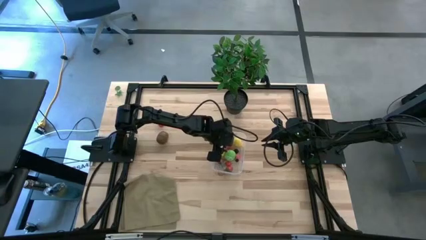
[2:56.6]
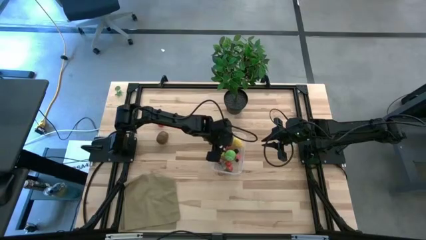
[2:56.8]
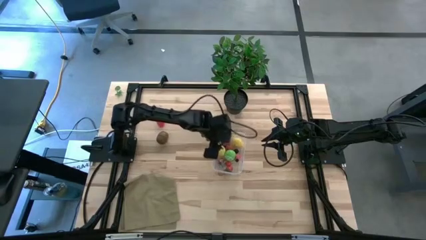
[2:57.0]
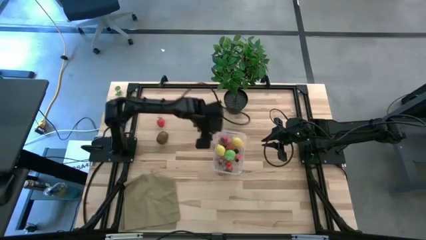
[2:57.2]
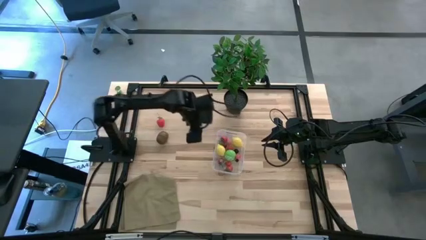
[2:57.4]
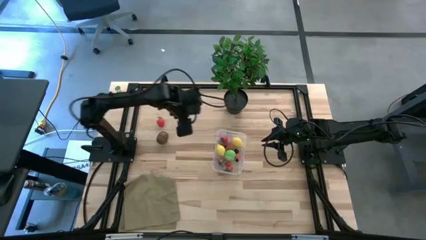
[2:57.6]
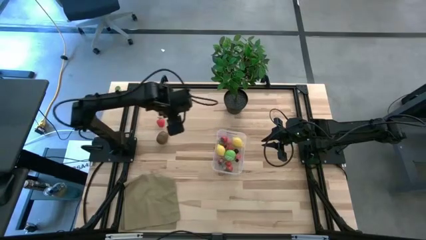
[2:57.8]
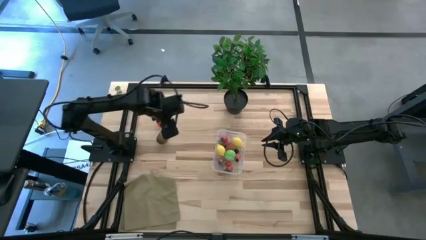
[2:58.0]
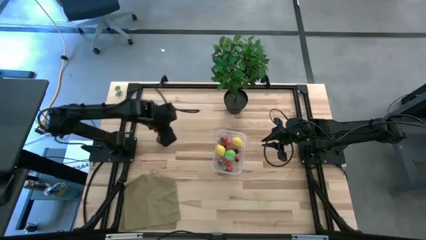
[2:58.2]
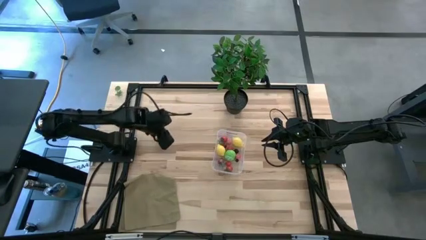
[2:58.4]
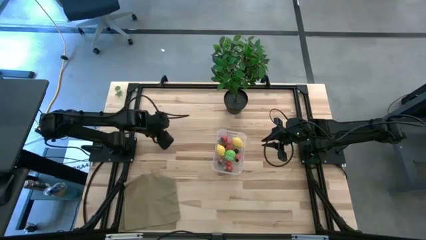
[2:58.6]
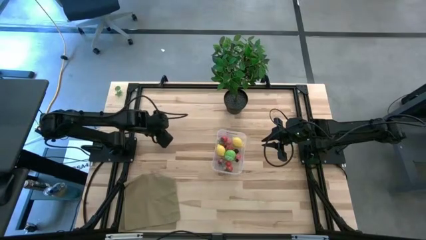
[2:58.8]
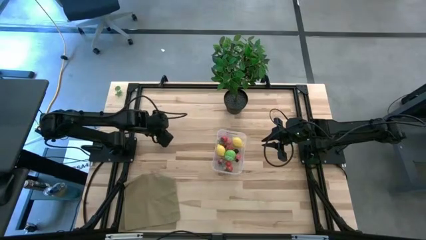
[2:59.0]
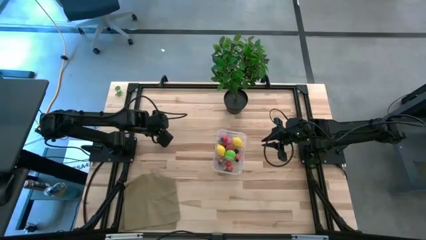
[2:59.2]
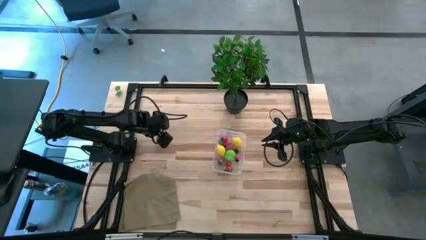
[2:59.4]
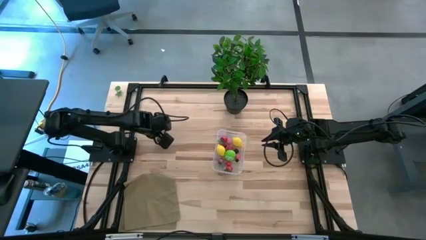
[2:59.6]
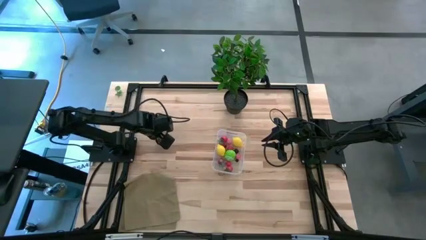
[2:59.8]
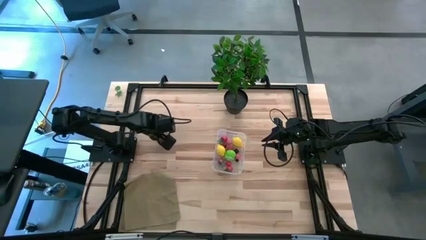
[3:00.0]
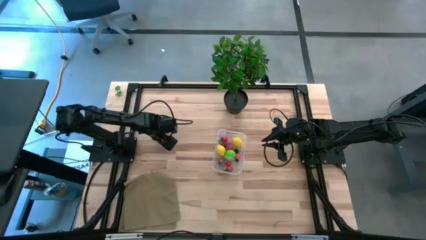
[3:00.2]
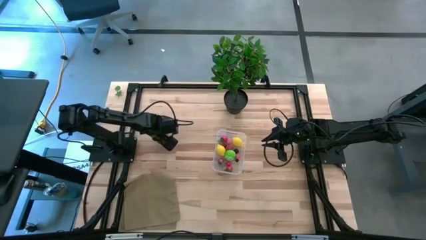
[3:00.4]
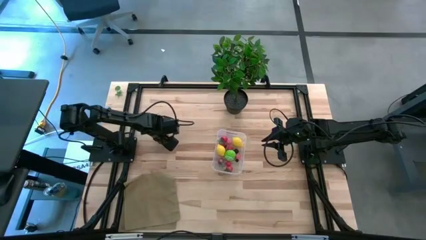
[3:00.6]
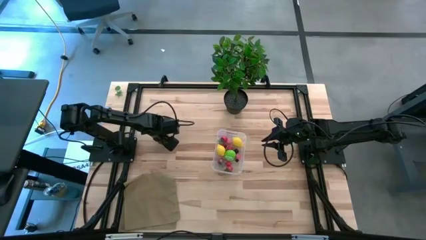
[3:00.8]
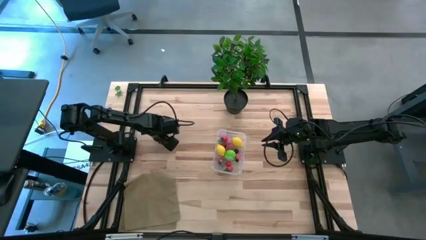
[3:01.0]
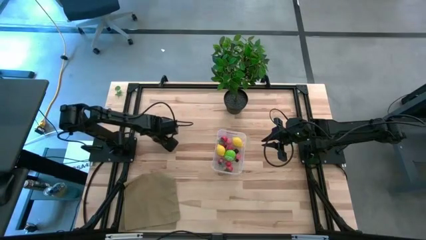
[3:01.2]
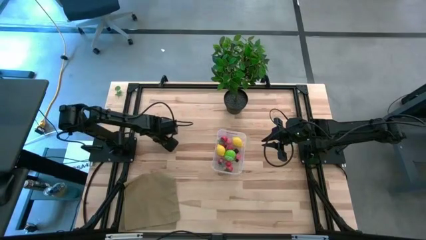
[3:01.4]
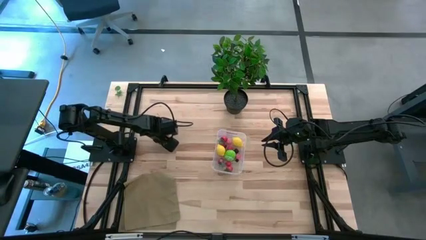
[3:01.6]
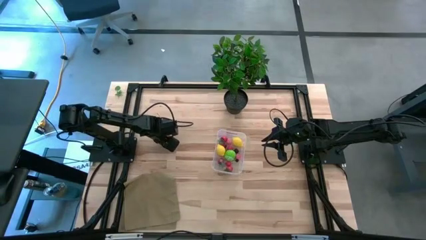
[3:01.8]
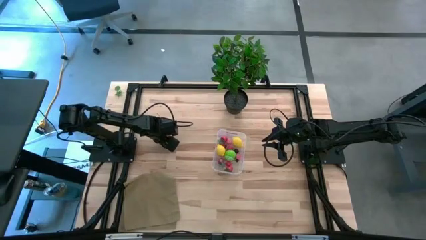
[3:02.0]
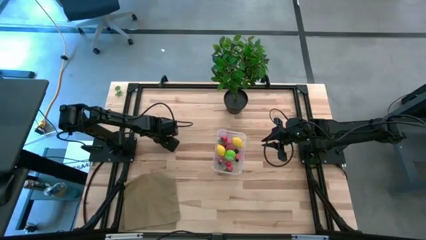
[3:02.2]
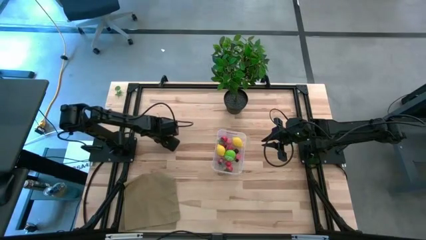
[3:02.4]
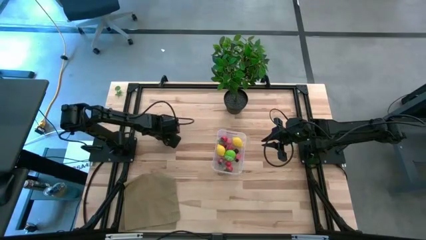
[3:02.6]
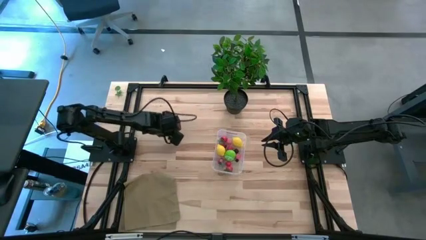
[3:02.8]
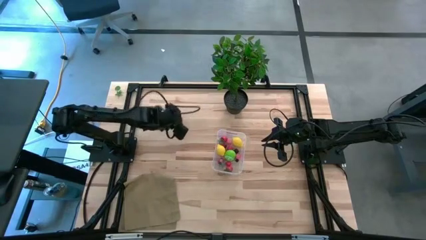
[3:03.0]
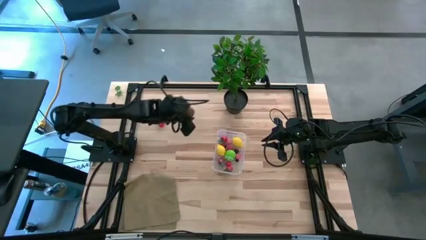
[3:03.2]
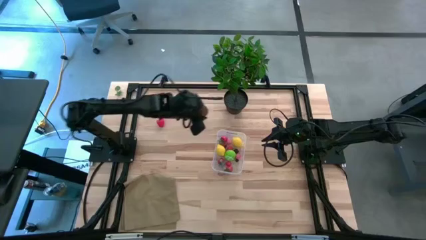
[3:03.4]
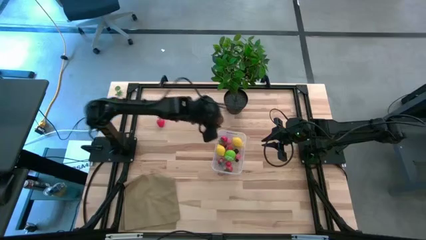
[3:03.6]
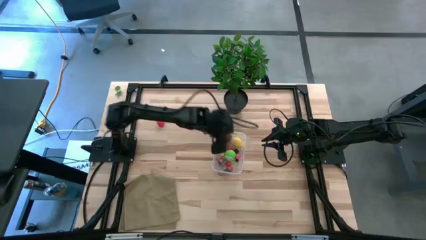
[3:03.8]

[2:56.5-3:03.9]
Task: Pick and placing Produce into tupperware
Put the brown kiwi into the transparent container

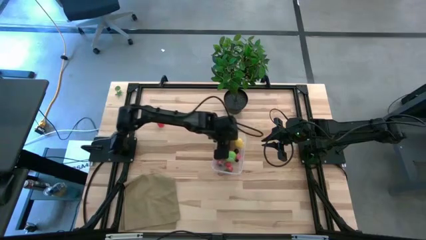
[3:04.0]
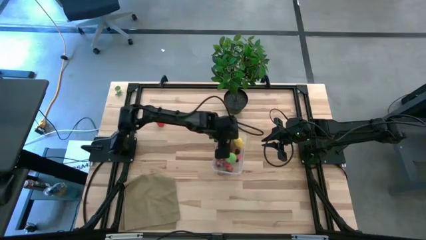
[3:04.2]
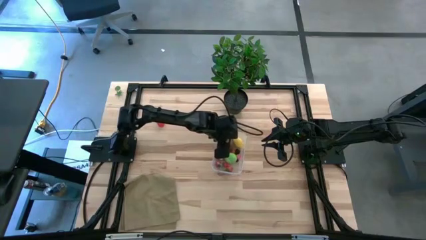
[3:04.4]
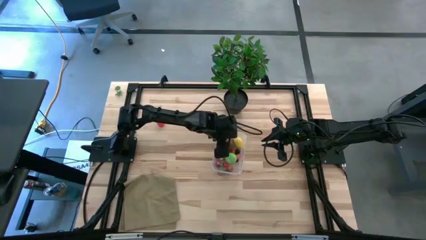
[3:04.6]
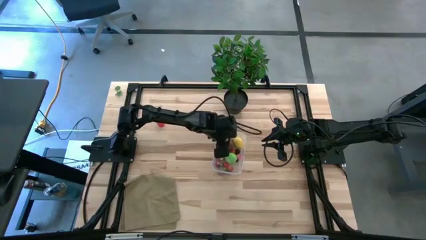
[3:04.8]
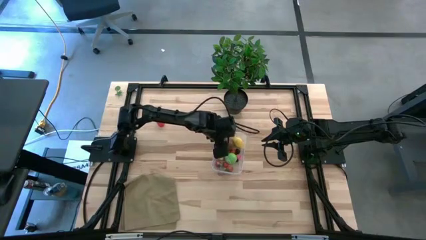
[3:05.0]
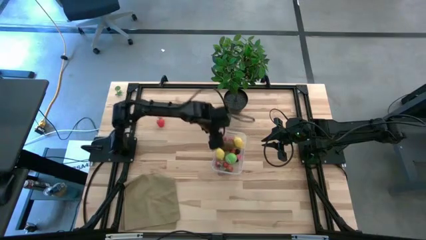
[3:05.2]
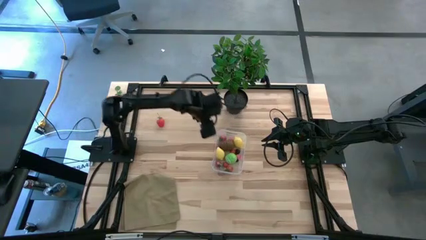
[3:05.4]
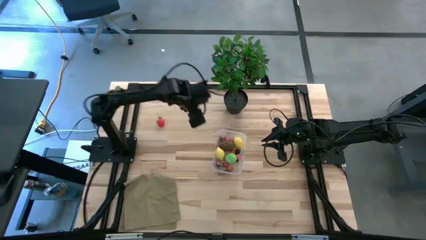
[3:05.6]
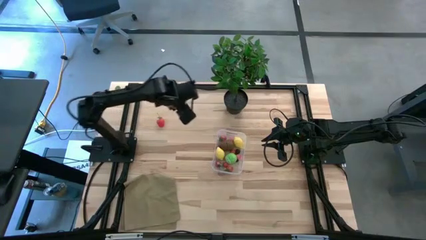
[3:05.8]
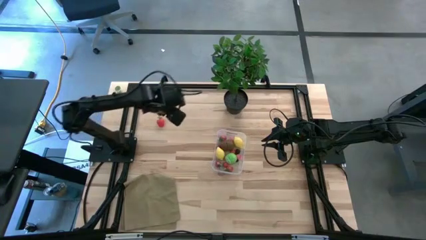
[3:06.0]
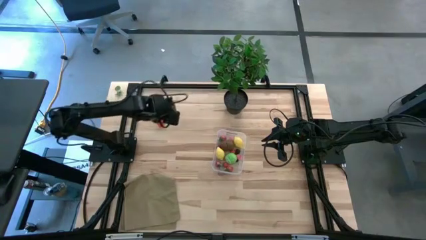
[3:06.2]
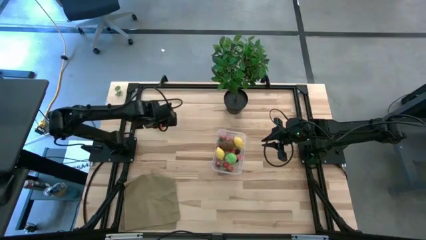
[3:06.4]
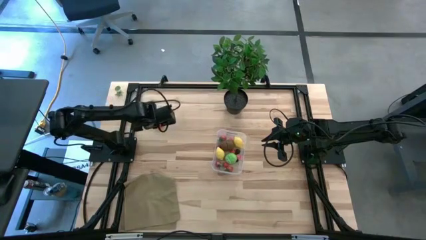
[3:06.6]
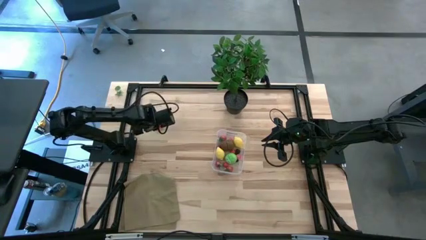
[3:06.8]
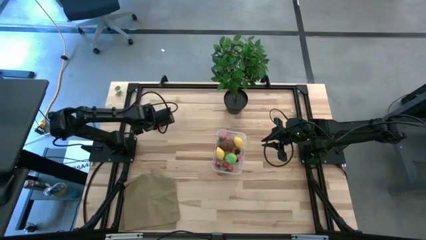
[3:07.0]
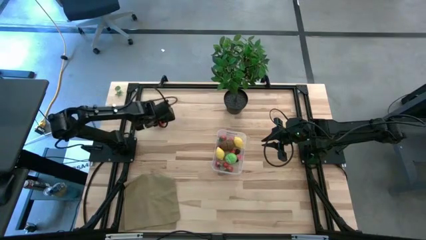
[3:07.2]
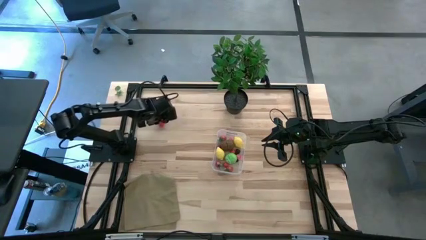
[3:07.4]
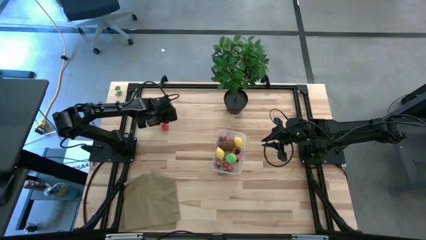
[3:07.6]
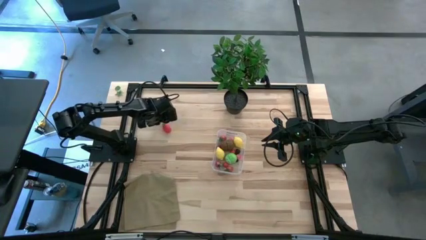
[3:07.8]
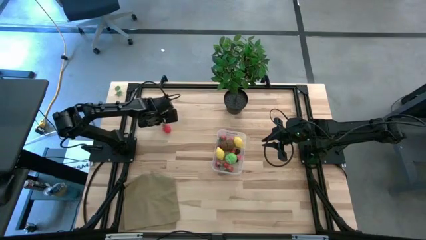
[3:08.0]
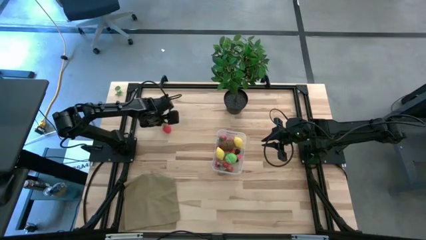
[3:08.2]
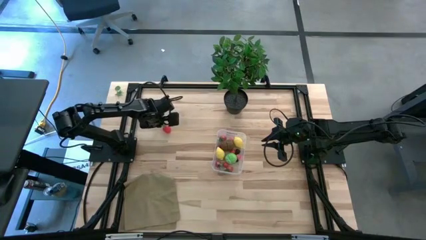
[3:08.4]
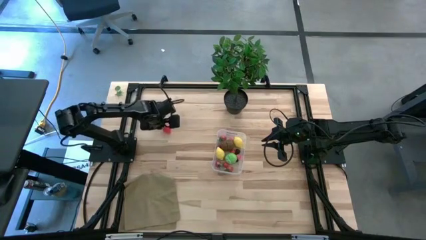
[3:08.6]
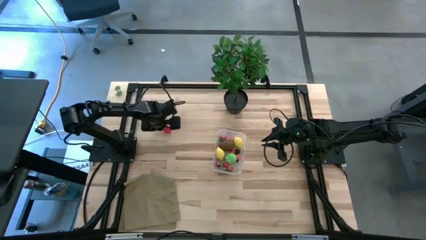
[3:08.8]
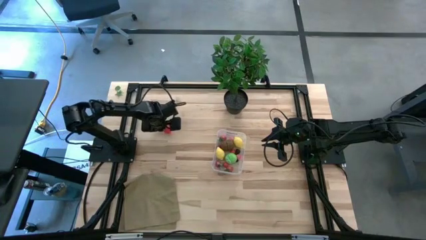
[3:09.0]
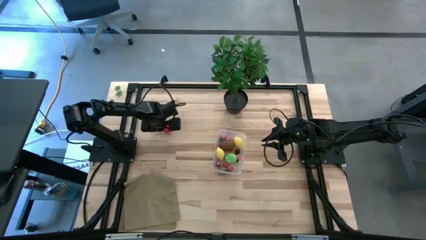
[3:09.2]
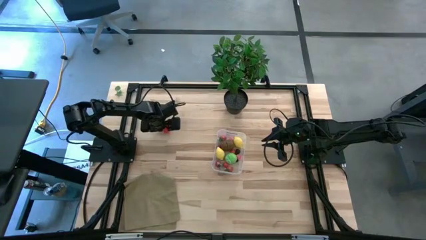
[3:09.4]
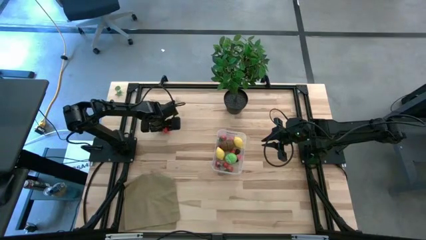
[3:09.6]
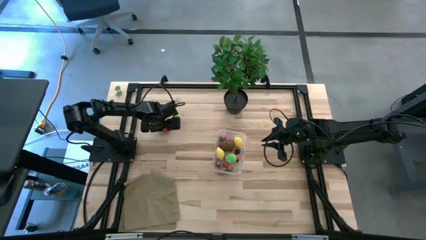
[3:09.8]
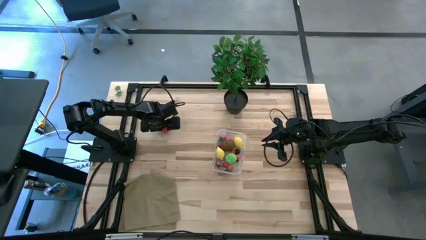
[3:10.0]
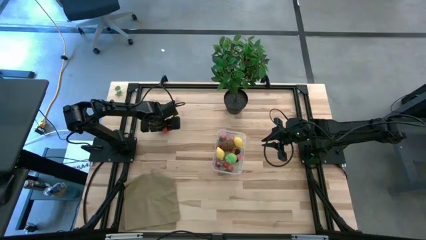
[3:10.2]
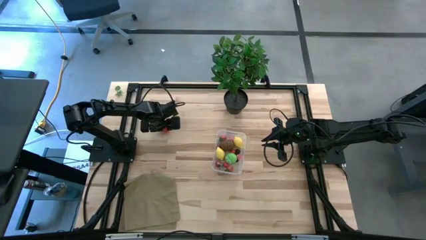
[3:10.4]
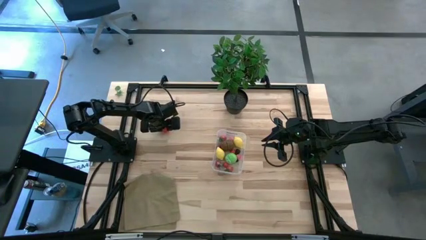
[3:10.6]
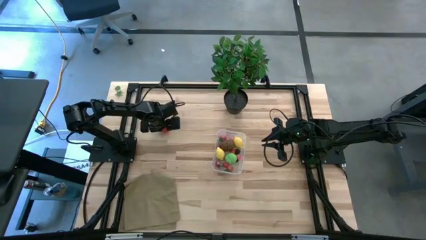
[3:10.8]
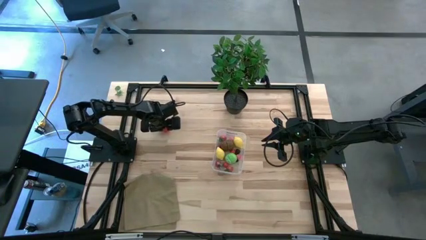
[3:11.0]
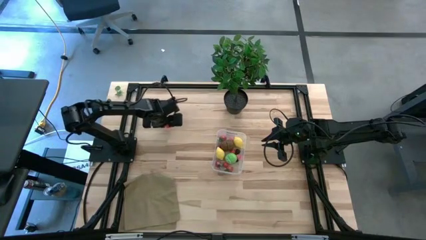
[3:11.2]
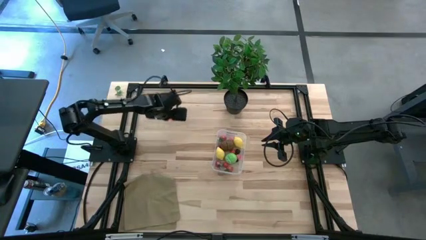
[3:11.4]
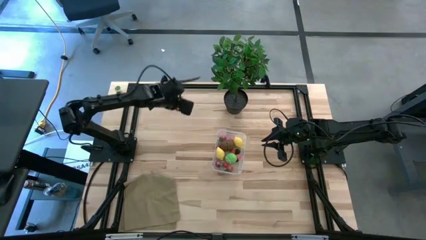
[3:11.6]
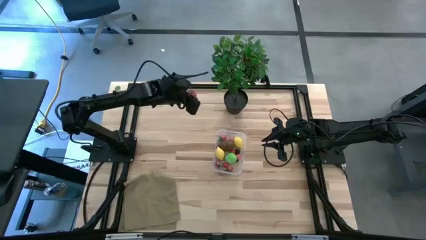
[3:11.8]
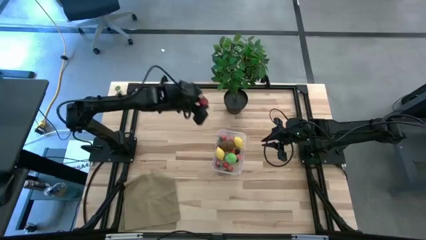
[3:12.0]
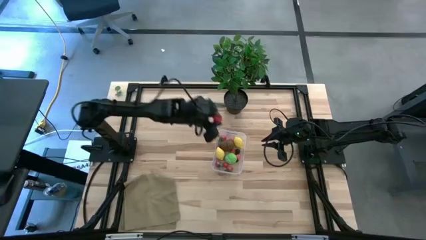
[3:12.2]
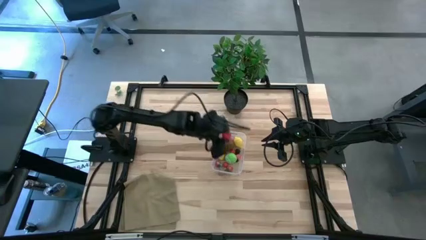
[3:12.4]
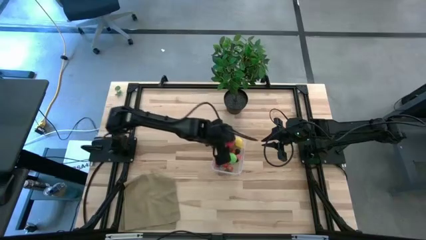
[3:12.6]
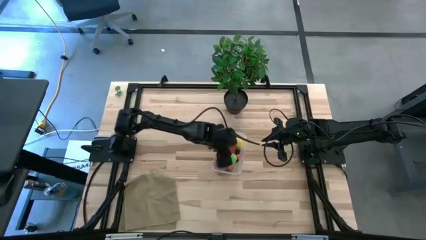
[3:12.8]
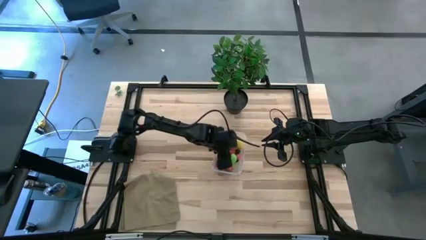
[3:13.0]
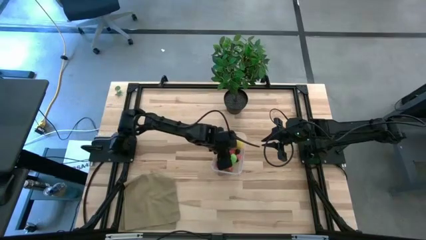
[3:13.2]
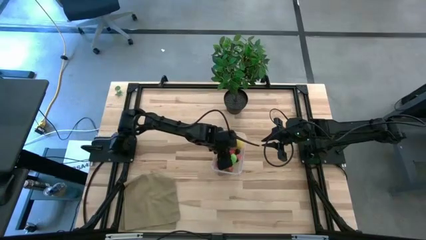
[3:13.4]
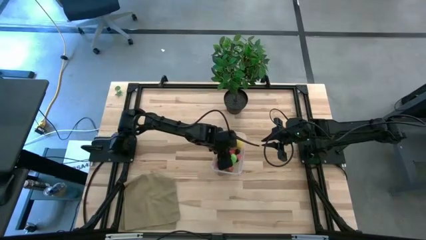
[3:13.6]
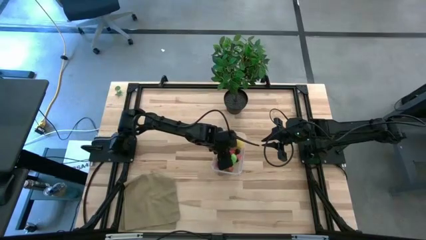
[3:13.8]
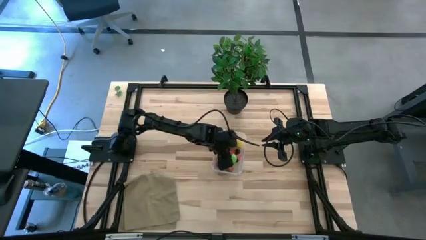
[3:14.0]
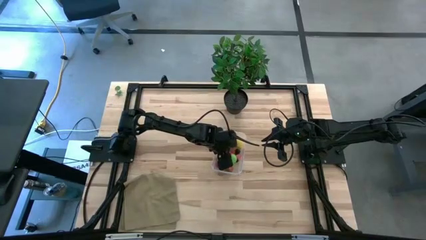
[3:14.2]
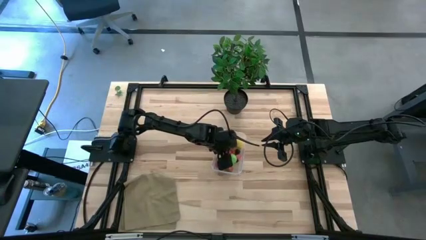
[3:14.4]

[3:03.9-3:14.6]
Put the red strawberry into the transparent container
